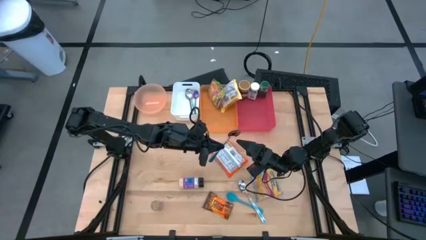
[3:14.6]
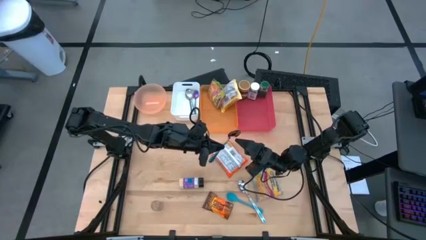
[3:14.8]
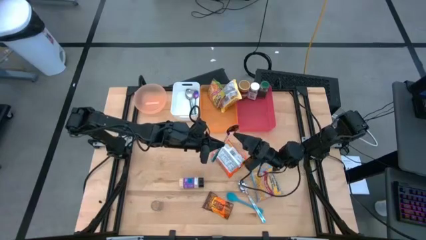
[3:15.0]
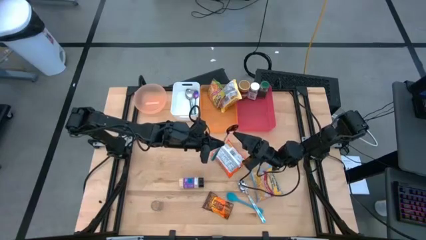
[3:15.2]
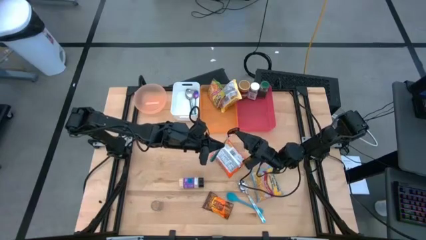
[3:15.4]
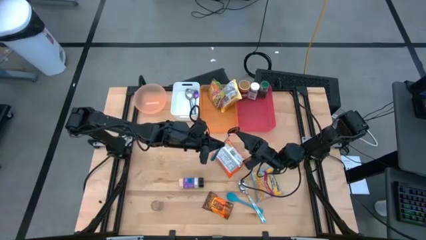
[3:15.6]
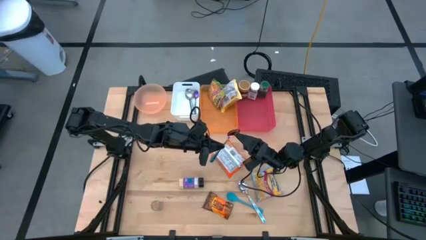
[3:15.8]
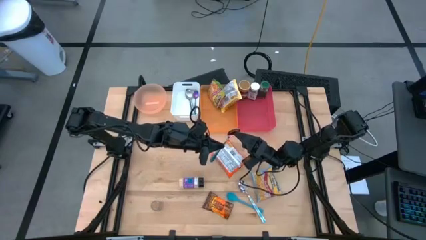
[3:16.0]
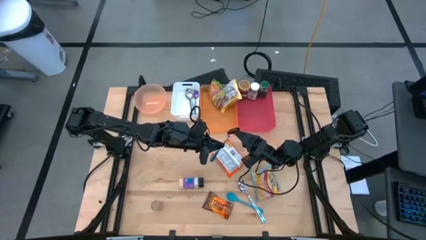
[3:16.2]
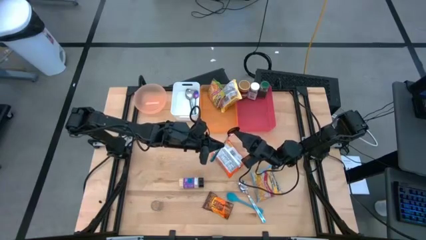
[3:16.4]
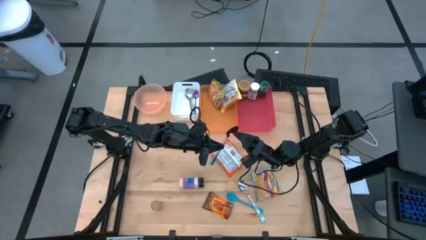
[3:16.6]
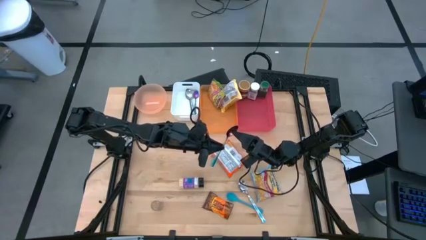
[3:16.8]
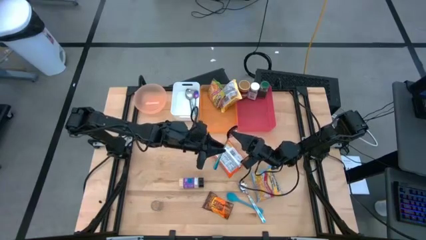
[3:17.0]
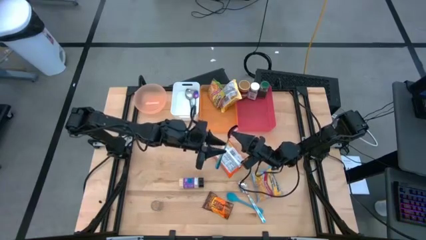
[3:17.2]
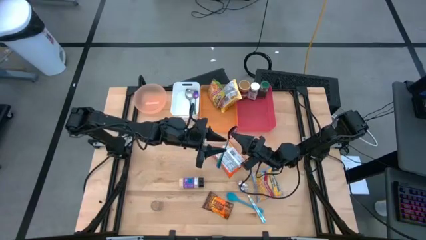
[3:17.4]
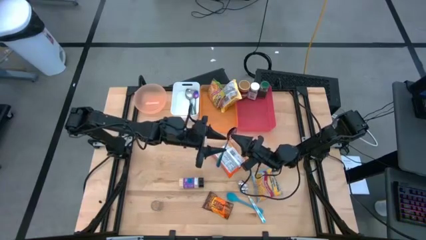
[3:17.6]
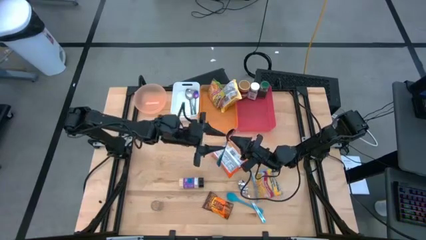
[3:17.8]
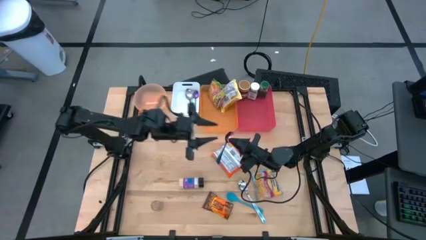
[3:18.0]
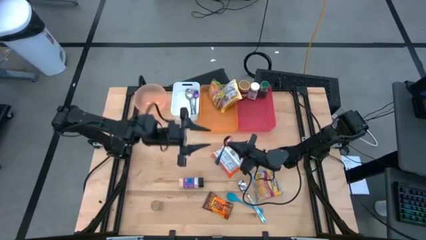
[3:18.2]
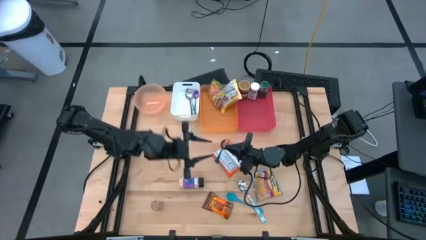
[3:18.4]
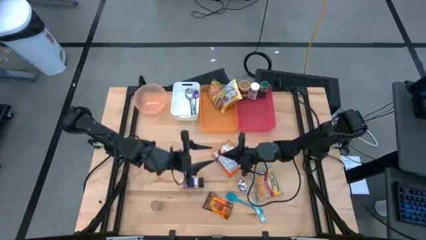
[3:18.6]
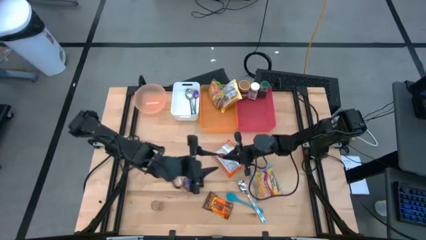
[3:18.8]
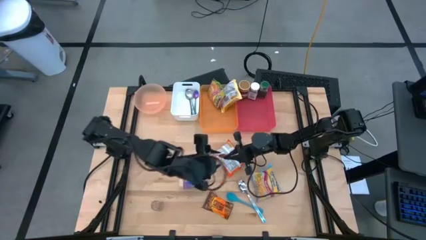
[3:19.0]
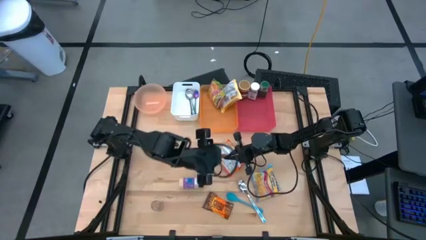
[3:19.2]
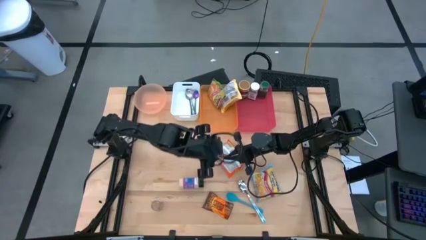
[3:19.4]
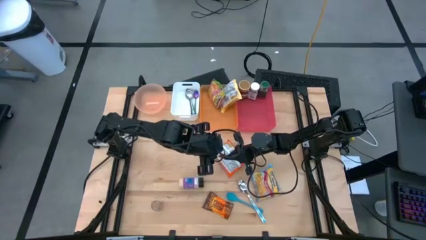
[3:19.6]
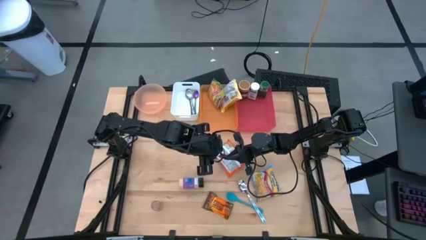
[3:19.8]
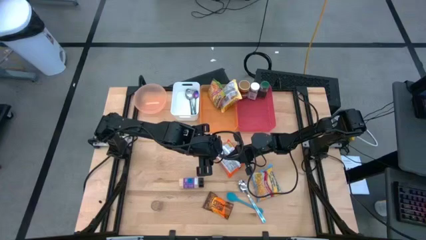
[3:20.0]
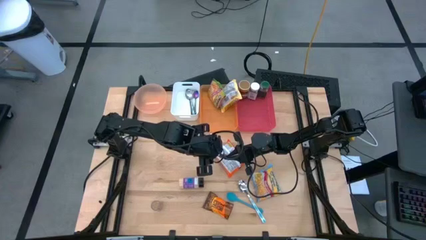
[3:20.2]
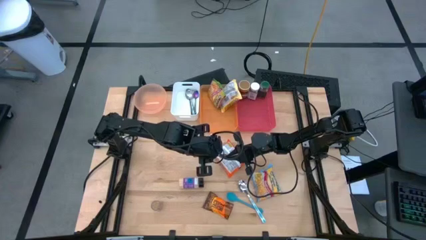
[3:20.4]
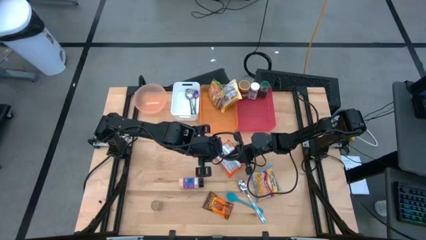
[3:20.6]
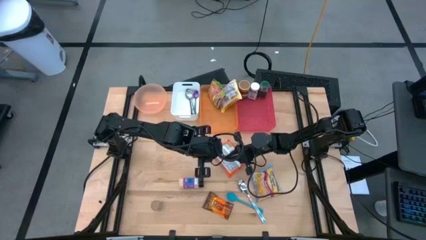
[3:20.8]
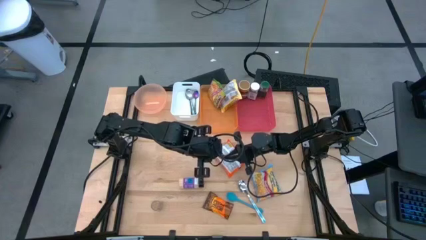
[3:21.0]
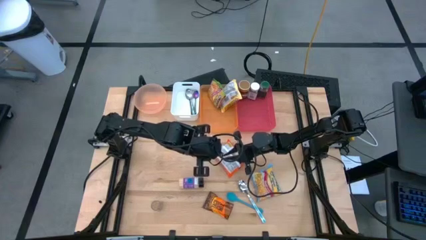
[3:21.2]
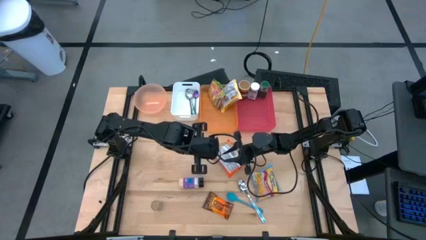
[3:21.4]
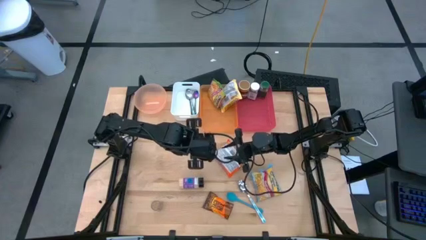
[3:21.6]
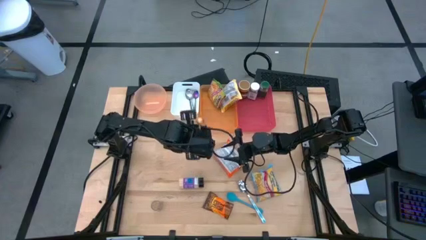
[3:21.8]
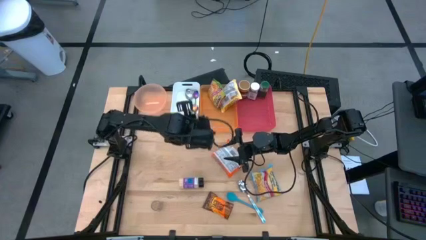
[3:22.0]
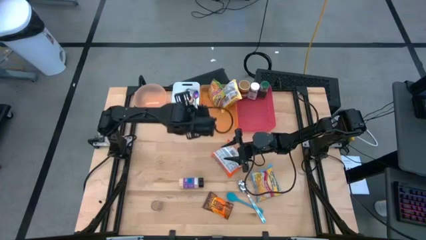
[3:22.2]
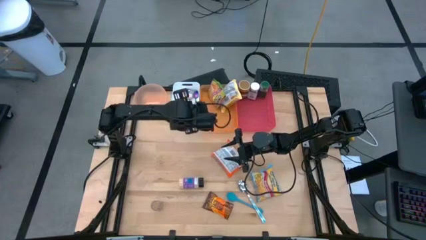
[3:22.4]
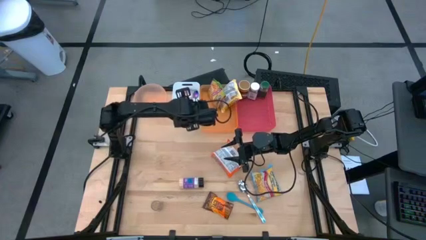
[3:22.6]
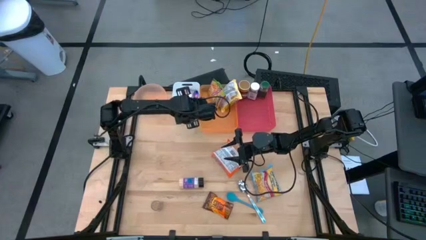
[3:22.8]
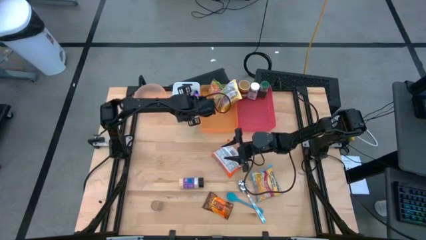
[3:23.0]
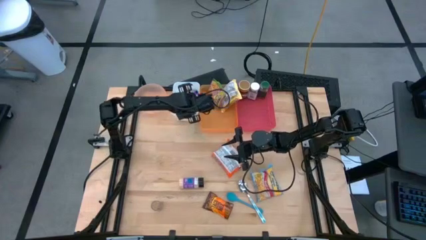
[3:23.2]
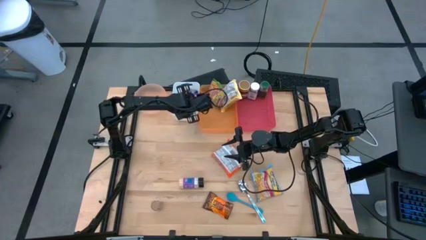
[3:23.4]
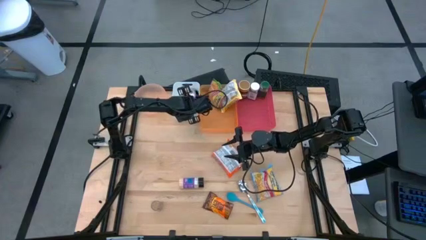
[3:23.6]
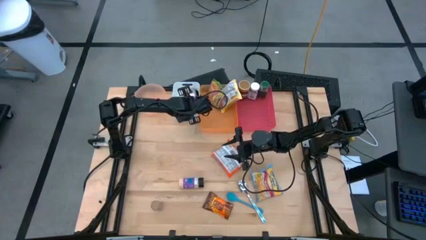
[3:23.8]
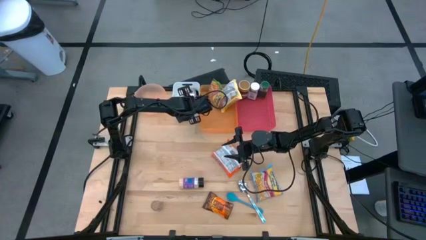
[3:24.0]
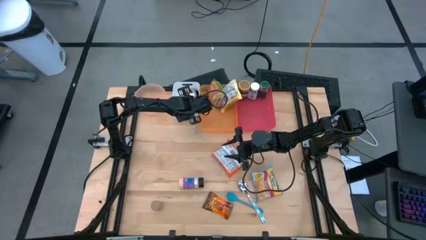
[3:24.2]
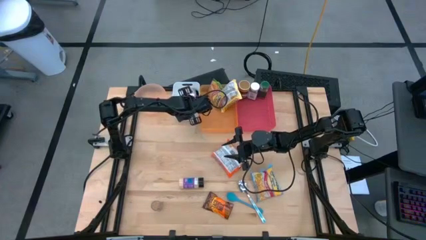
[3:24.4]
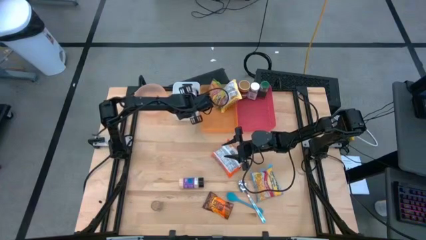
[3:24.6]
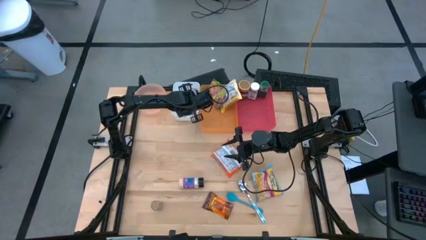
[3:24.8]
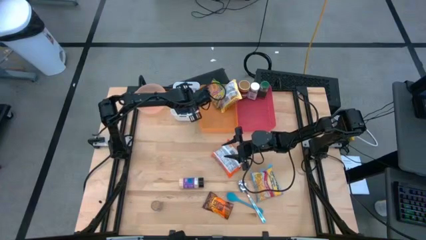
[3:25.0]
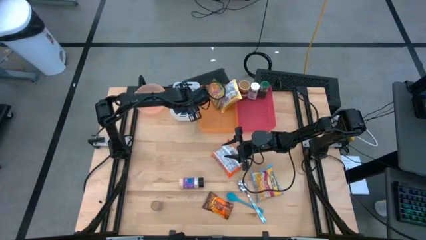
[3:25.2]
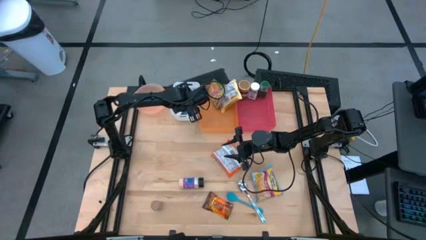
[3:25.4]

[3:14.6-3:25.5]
Task: Pick & Place Food Item
Put the purple blue spoon into the white bin

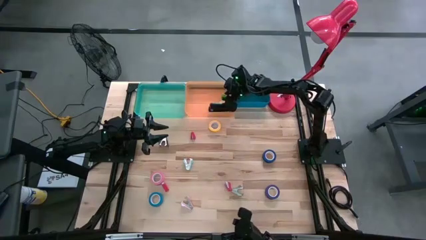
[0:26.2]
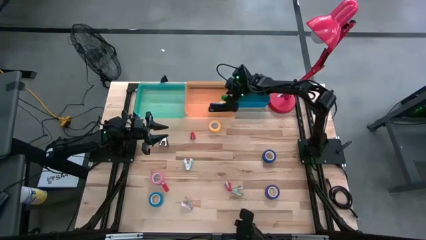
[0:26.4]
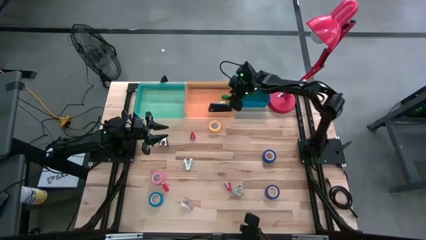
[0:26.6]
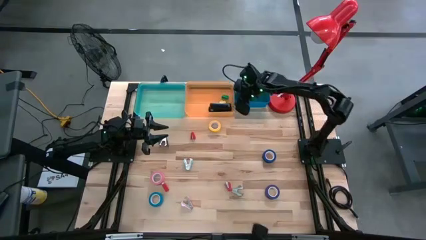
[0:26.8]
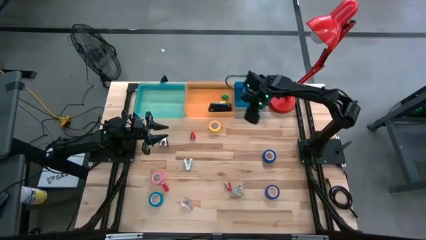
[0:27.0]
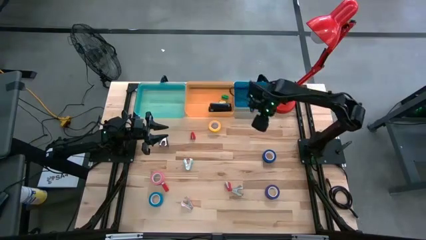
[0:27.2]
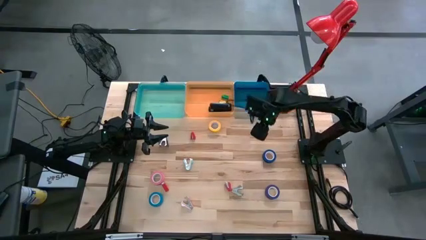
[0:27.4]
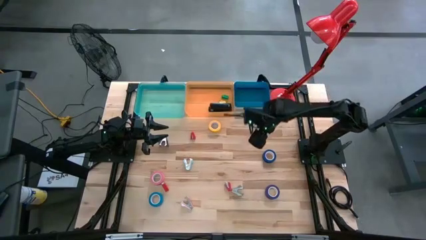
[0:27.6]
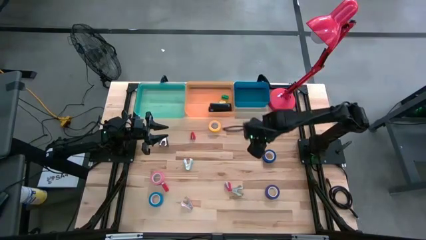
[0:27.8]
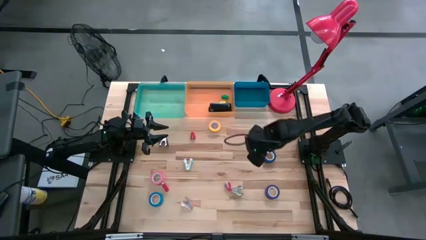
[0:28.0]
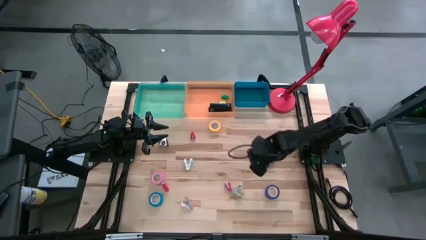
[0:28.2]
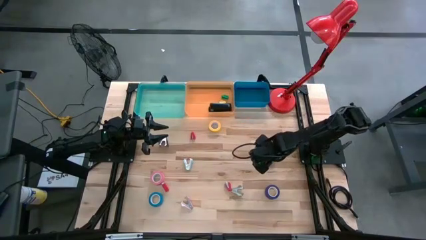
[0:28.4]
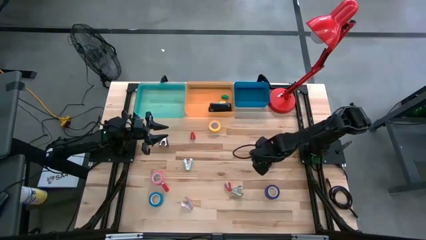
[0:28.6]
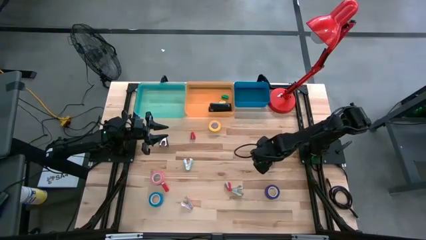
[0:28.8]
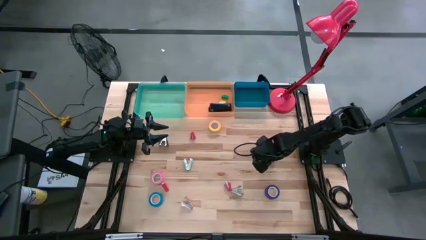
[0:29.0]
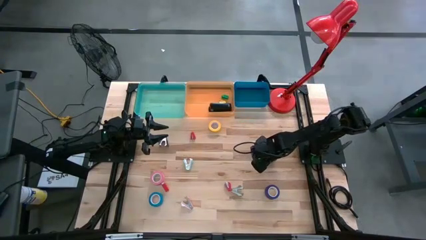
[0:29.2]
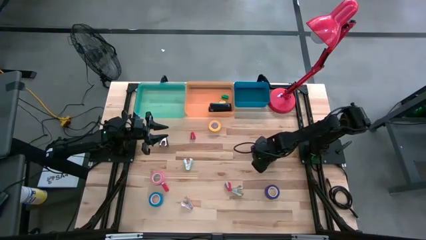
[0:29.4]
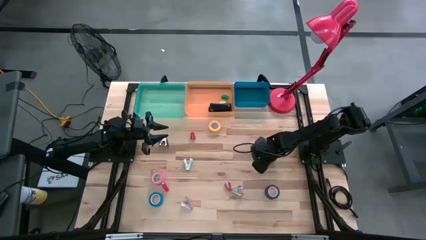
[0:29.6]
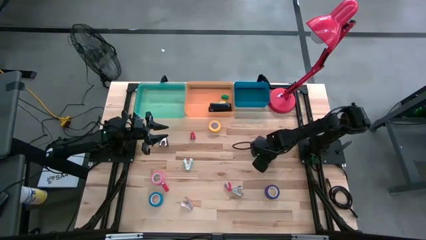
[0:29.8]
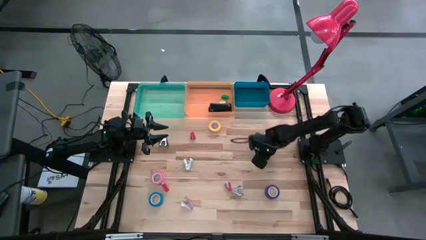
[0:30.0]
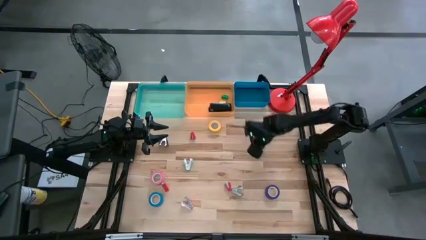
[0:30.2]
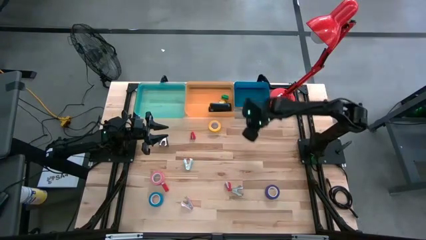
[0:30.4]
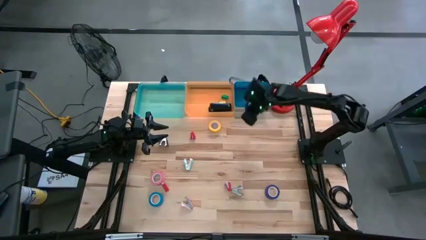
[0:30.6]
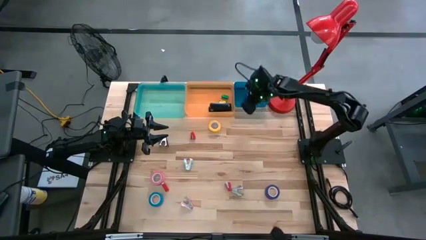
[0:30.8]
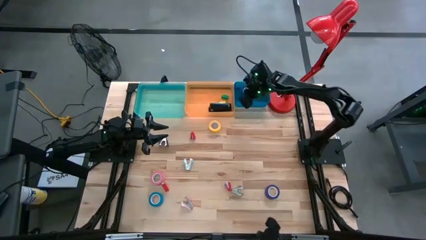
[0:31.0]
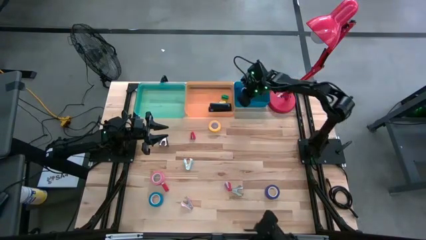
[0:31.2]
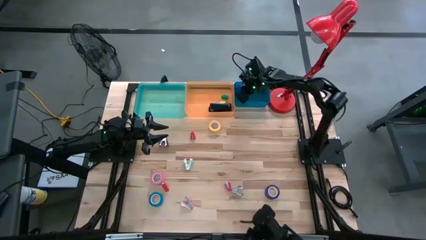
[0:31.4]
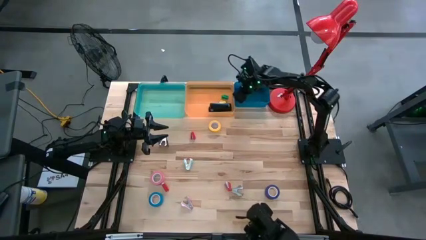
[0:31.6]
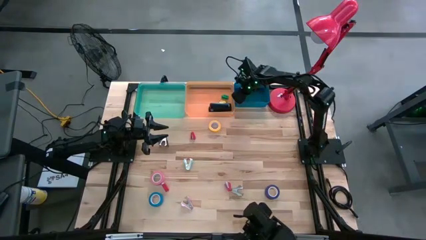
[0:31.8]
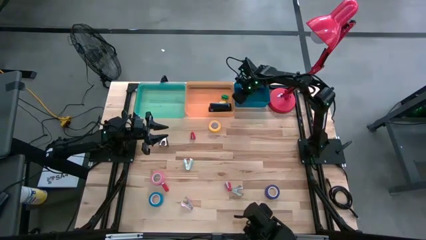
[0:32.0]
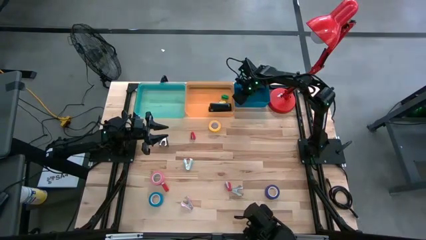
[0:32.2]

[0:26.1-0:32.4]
Task: Pick and place Stapler, Stapler remover, tape
Put the dark blue tape into the blue bin
